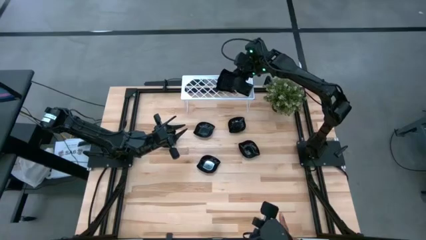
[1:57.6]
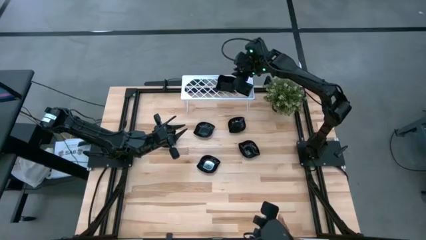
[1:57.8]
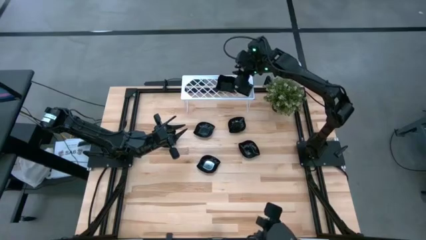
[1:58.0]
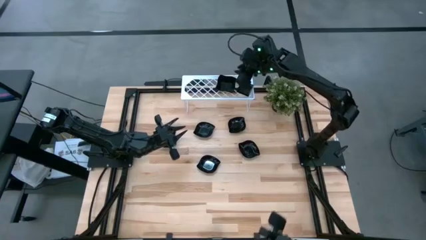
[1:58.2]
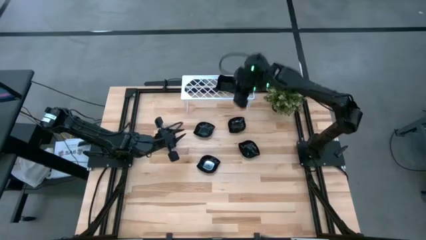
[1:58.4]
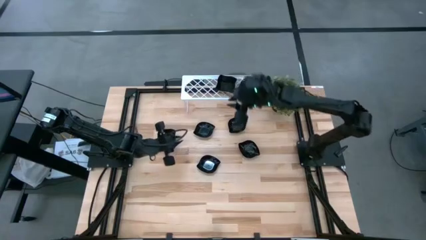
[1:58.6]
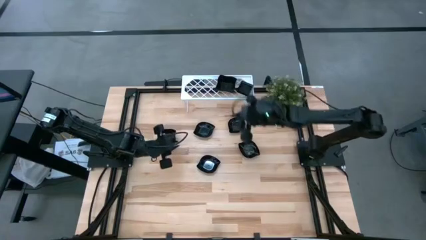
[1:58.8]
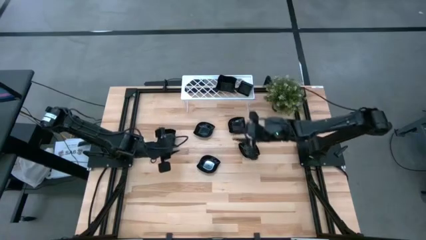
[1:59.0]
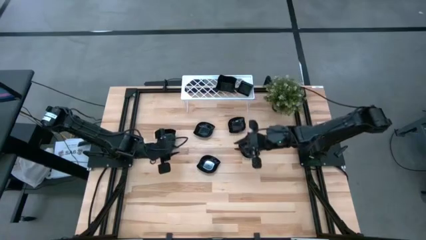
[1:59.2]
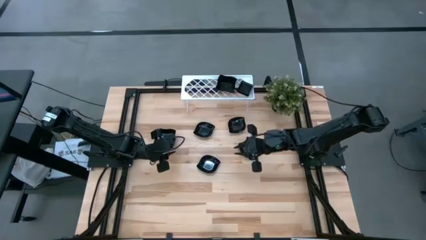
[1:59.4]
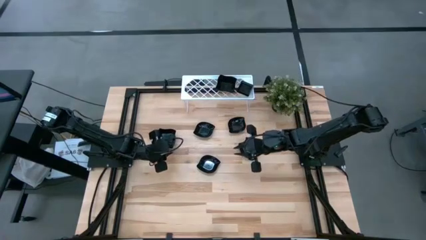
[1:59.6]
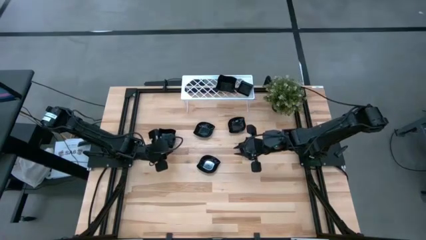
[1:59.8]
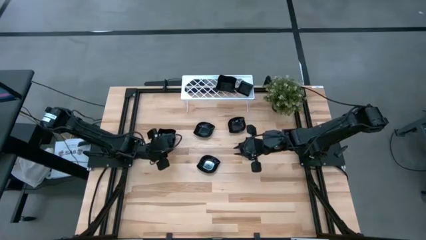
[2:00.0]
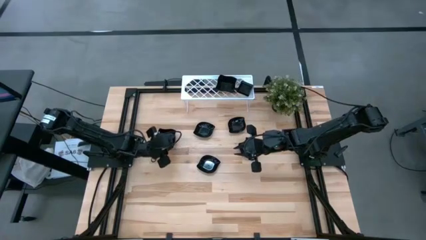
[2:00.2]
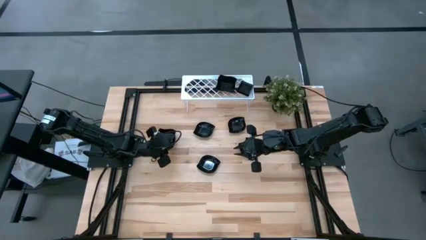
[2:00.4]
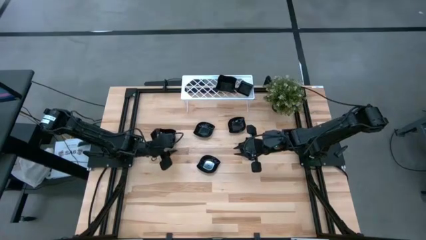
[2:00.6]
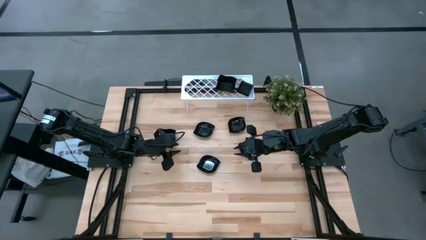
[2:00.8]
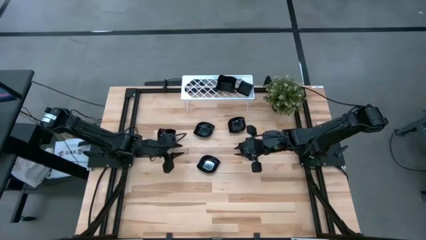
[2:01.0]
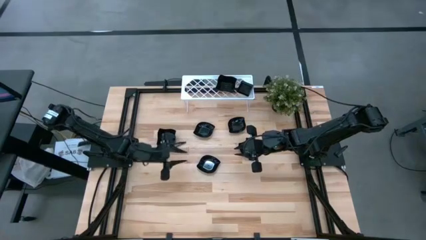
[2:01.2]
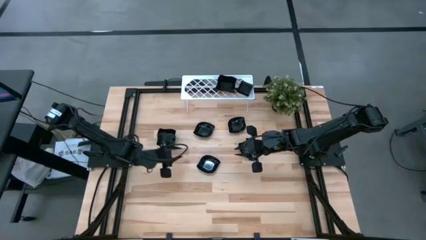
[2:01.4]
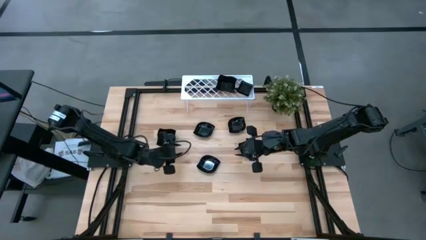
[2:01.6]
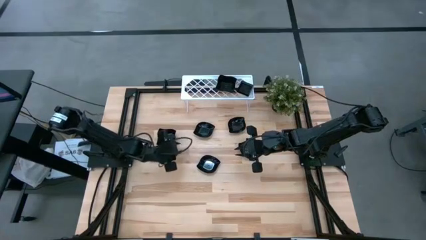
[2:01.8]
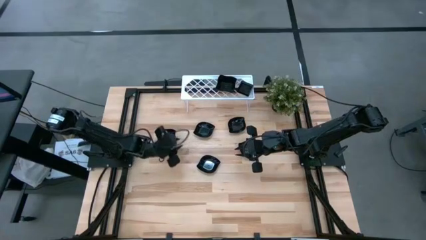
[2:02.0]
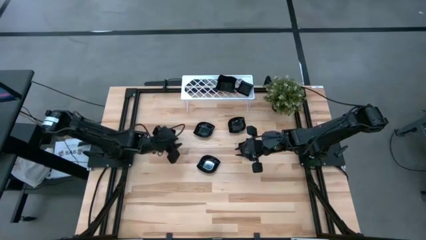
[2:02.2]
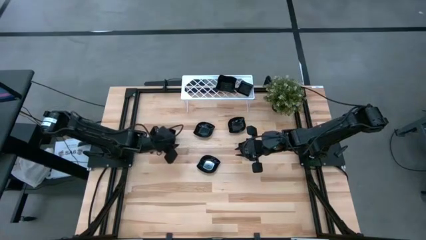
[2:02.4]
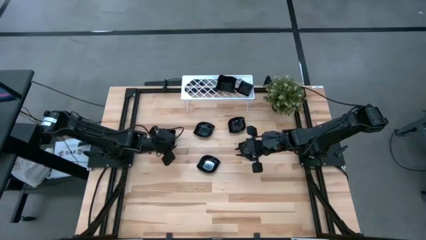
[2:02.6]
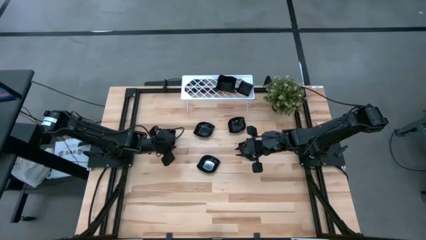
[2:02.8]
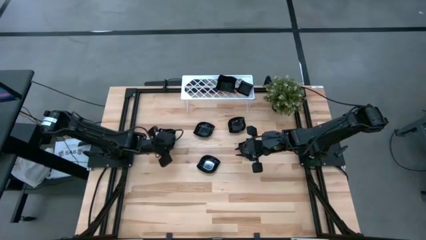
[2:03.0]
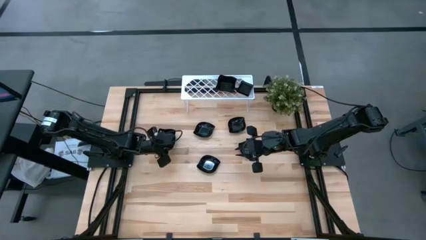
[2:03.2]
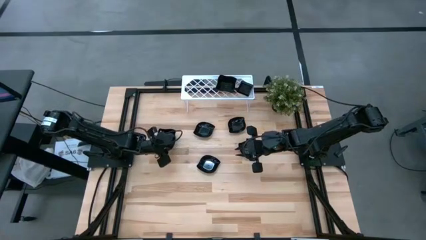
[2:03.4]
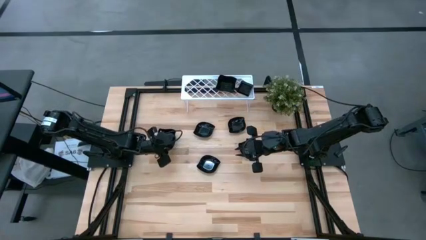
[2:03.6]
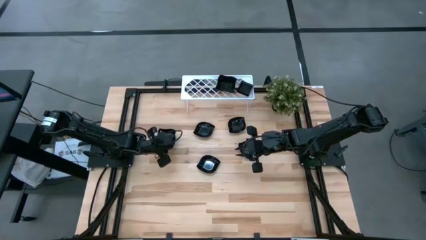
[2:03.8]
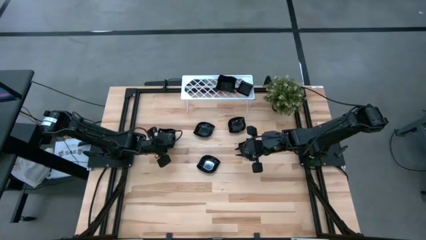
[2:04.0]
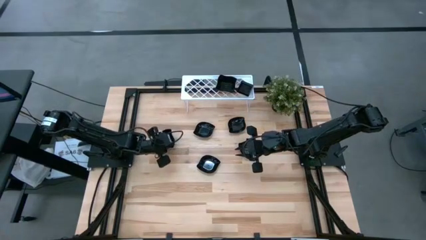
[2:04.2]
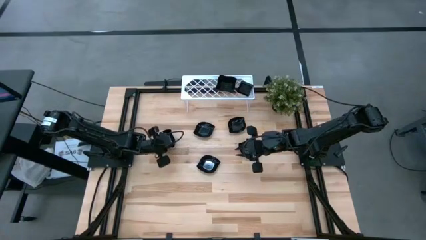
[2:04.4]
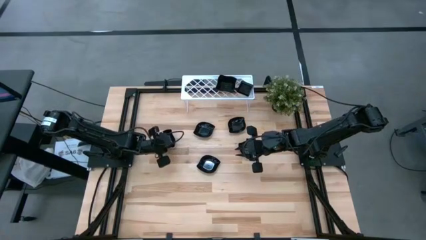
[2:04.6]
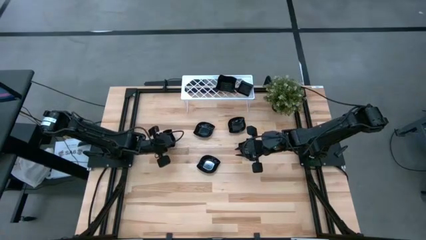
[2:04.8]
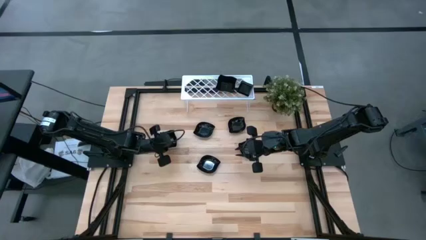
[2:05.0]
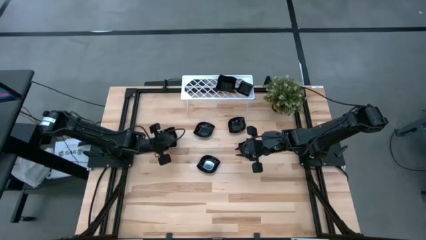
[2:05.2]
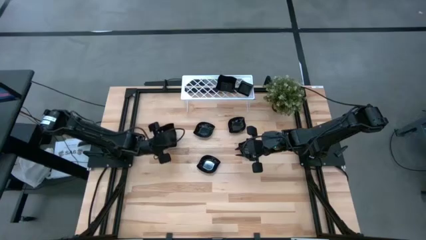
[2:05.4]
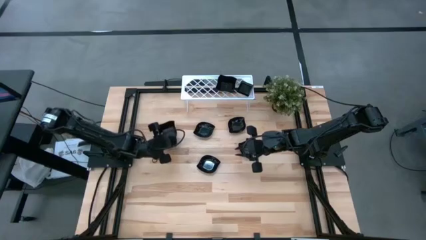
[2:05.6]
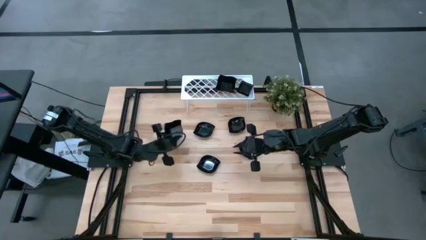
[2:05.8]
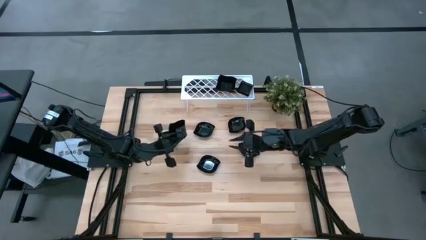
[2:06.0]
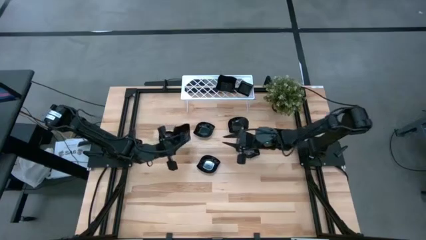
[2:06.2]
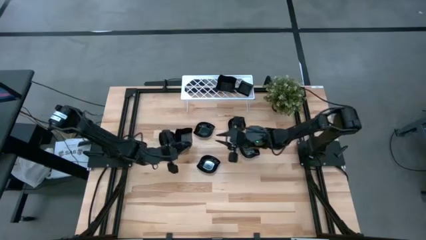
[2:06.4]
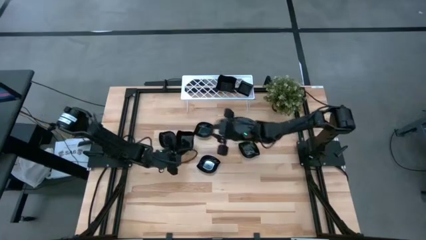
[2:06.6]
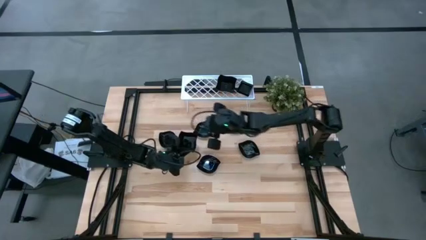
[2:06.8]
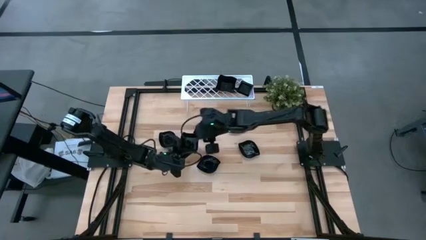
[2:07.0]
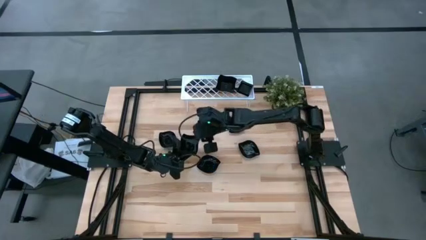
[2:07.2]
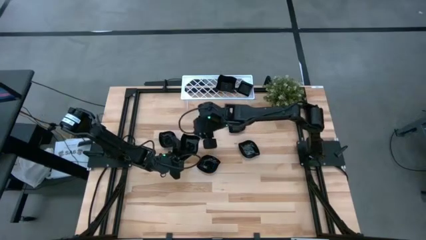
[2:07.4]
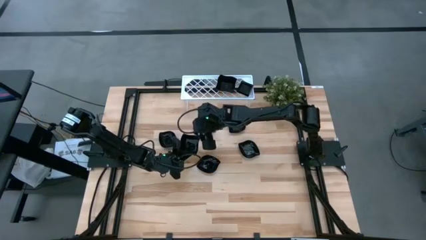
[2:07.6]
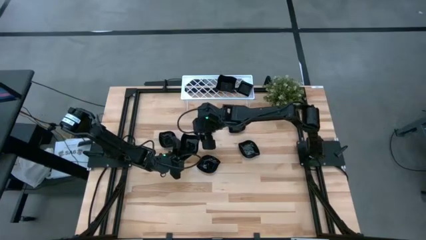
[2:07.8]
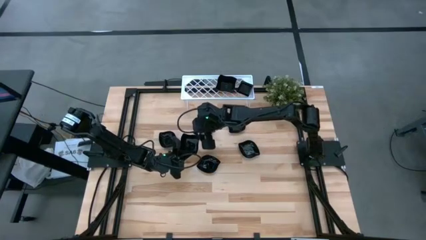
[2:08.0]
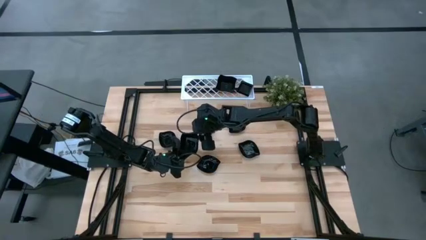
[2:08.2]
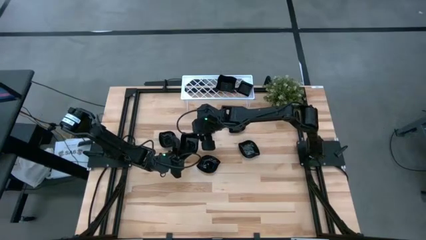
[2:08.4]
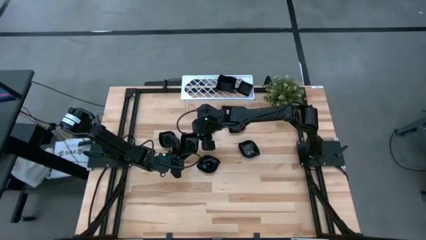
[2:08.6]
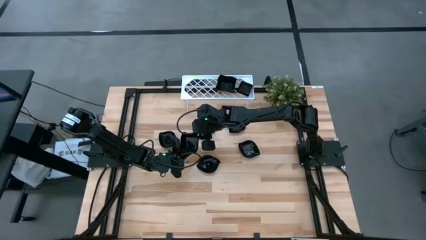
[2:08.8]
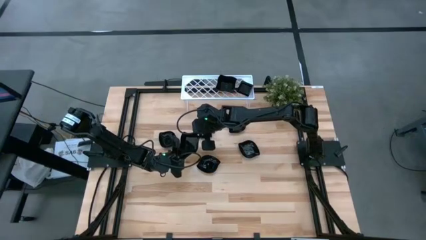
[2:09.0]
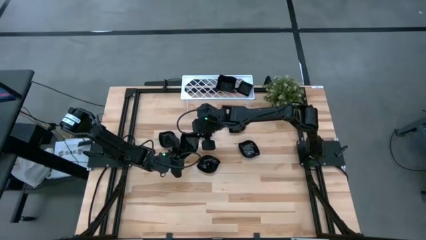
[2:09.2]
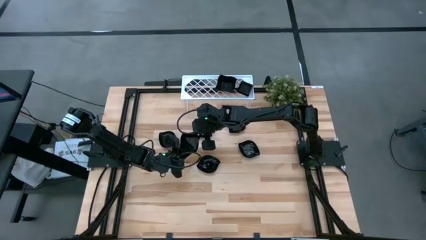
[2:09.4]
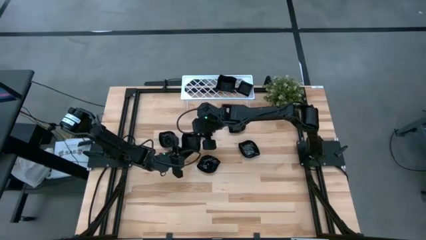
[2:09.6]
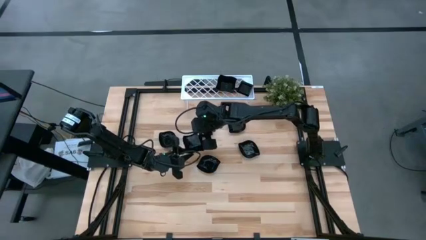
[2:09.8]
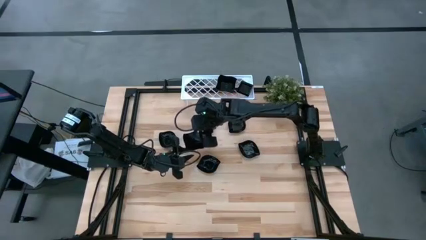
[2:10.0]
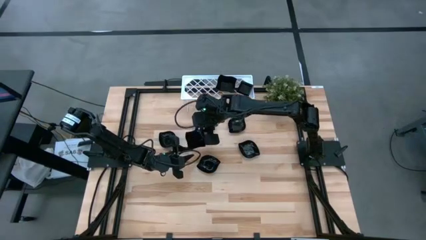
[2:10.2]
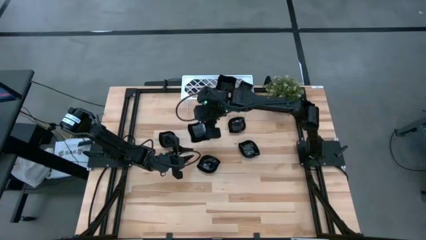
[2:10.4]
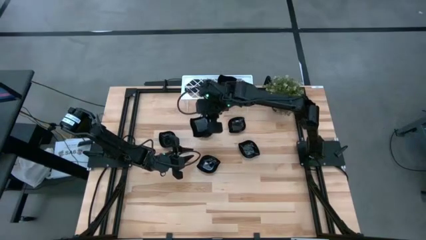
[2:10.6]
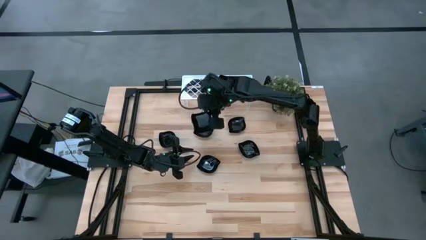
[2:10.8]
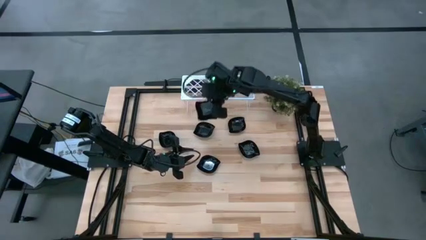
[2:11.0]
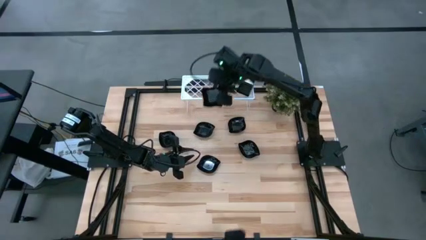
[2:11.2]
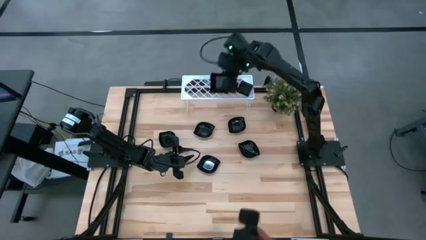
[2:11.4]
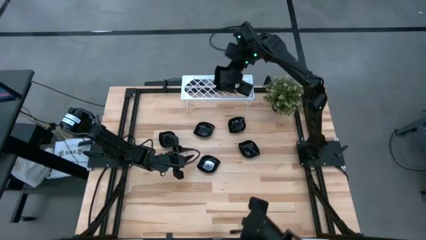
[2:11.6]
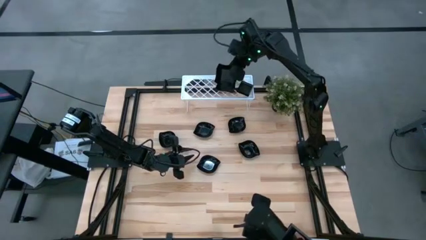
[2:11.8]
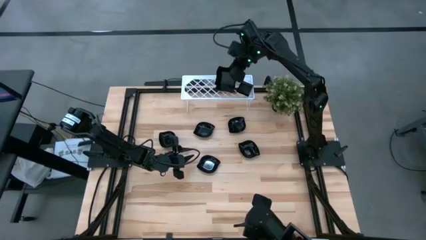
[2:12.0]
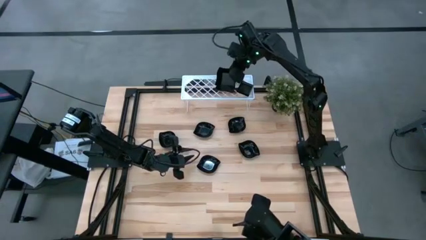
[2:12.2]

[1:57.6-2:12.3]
Task: Pick & Place Mini shaped plates
Stack the black distorted square plate on top of the black distorted square plate on the shelf

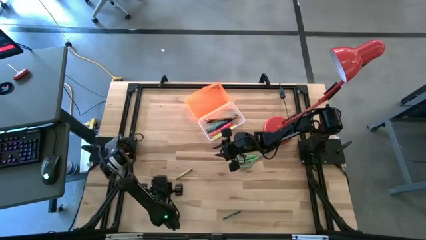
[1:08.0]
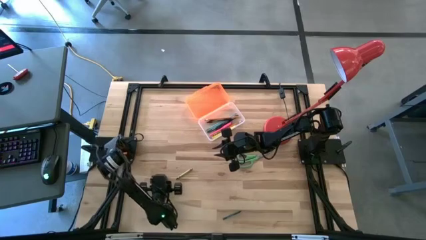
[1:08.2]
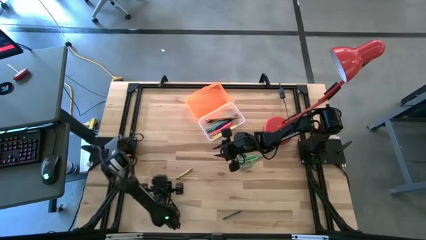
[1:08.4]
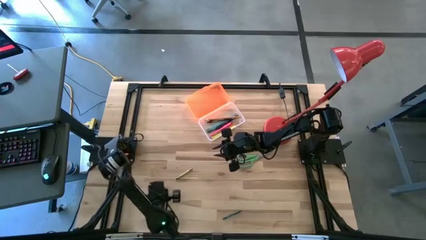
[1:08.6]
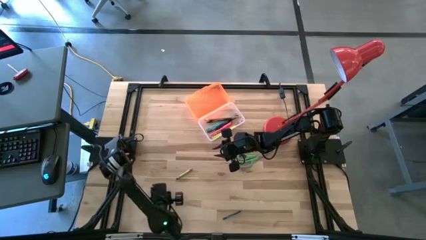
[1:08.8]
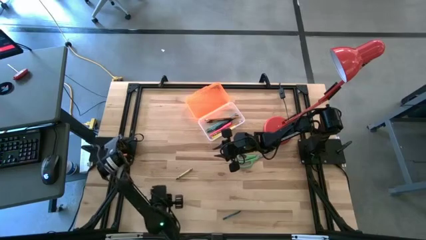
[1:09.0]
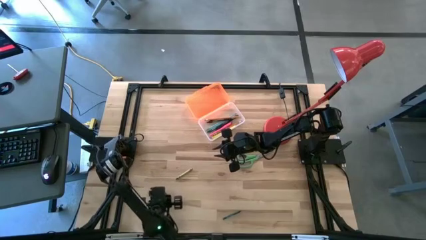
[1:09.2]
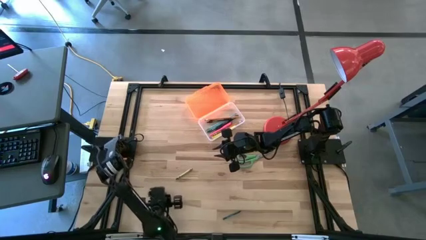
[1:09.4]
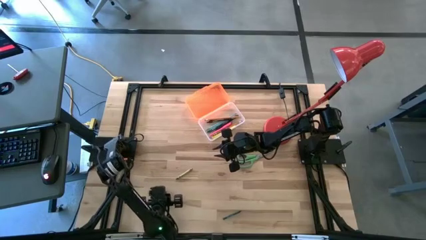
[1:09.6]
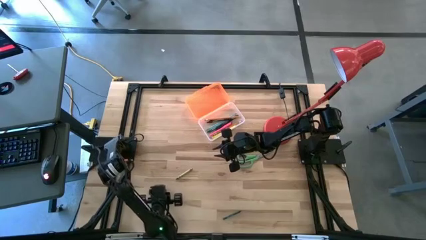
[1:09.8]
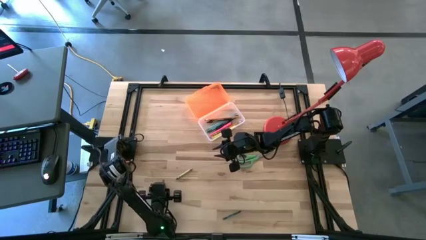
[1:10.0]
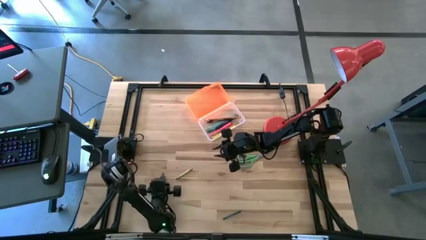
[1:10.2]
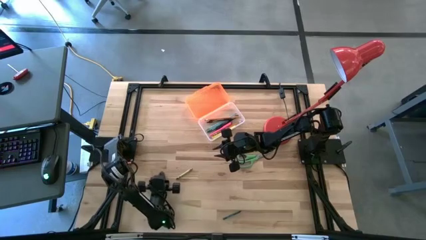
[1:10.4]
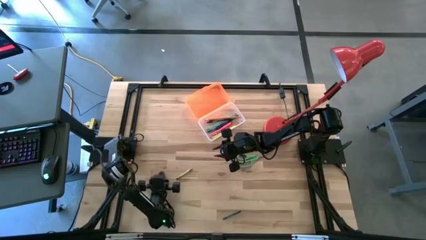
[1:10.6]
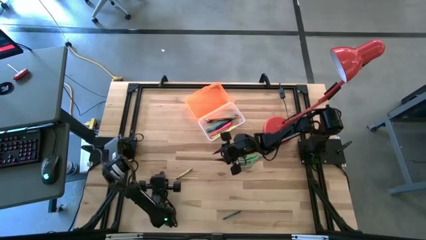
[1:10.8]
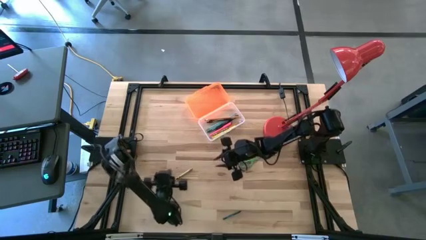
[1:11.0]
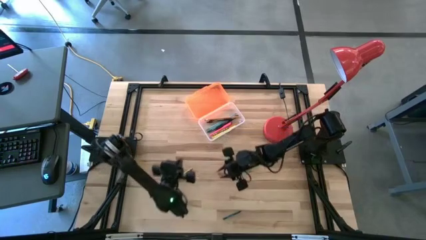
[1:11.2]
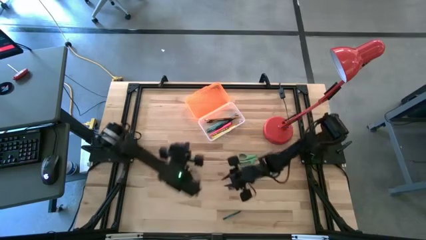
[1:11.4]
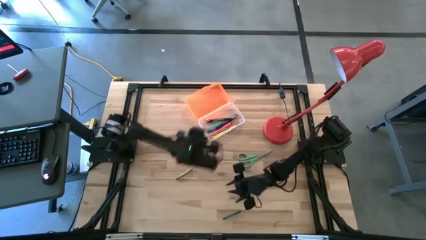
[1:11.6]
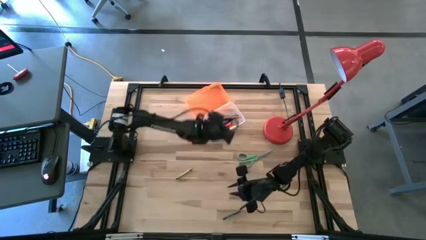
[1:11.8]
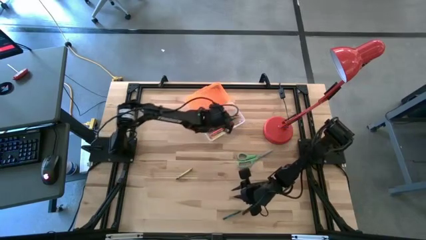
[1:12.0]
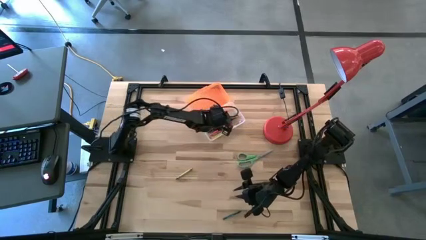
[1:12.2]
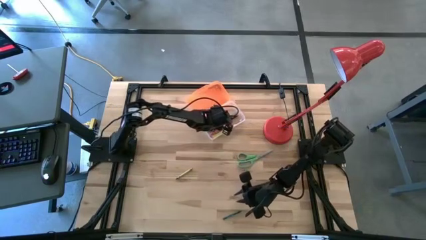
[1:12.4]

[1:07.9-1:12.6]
Task: Pick & place school supplies into a supply box
Put the dark green crayon into the orange supply box
